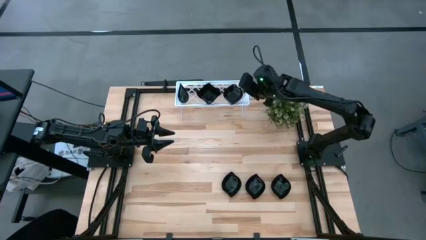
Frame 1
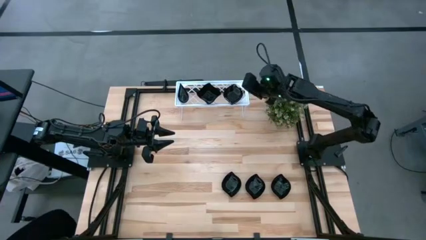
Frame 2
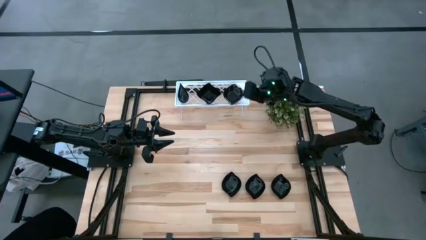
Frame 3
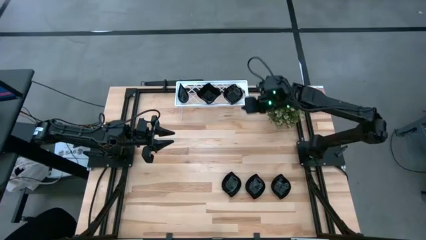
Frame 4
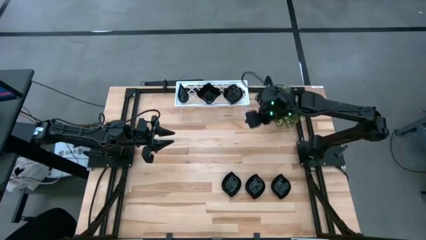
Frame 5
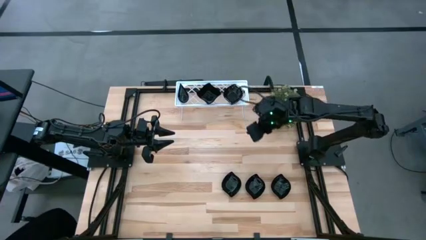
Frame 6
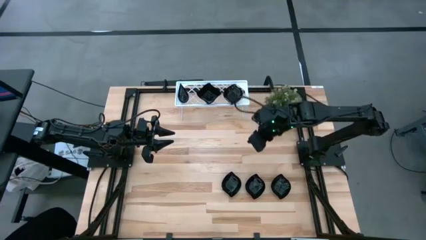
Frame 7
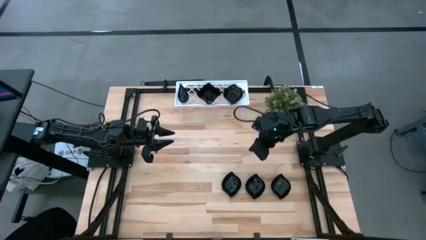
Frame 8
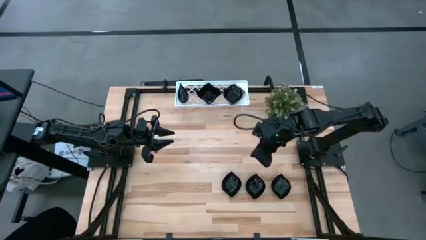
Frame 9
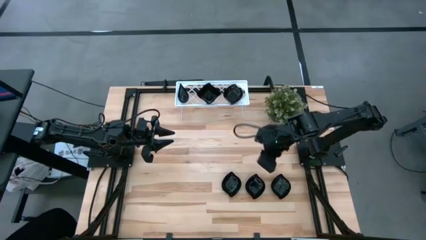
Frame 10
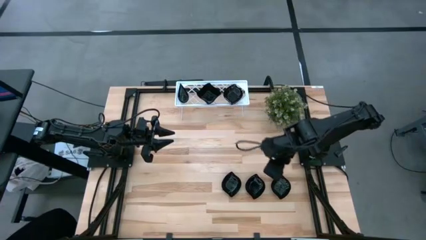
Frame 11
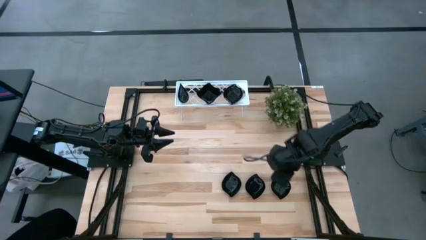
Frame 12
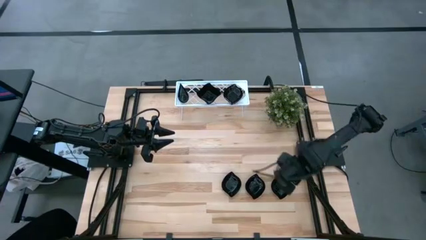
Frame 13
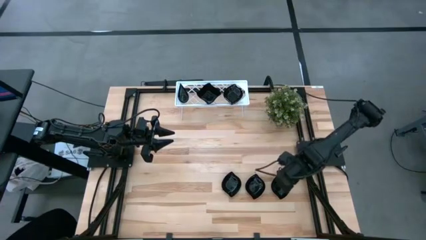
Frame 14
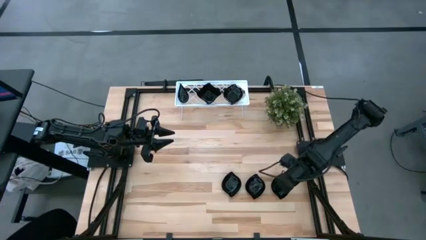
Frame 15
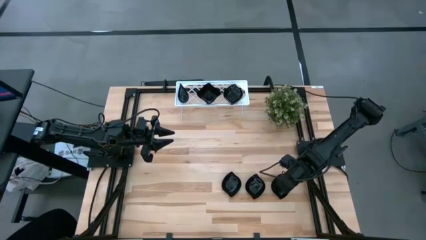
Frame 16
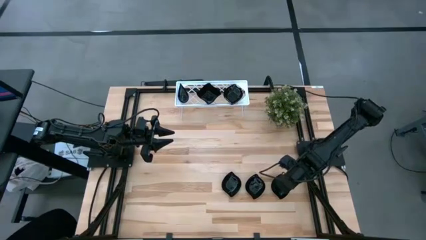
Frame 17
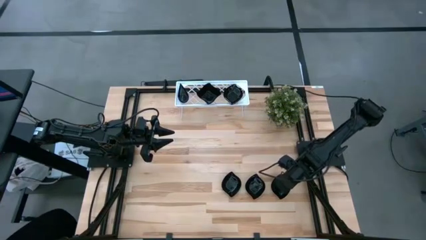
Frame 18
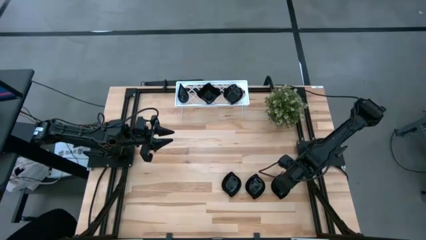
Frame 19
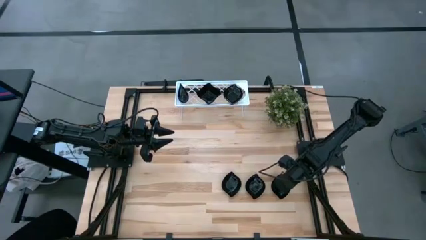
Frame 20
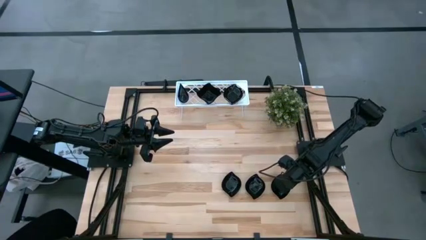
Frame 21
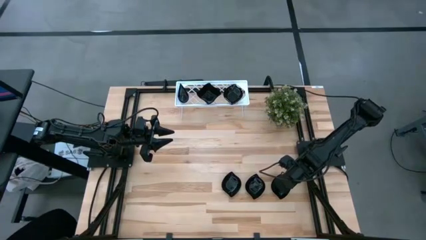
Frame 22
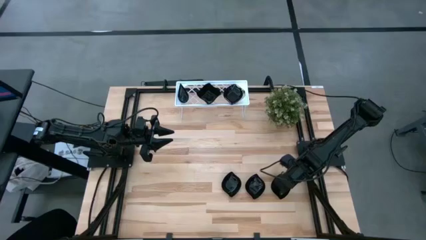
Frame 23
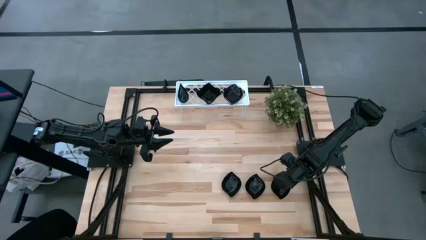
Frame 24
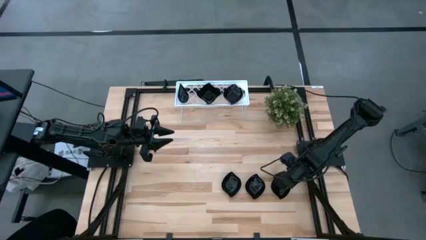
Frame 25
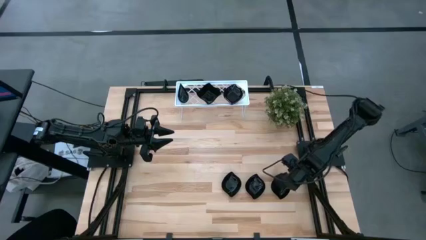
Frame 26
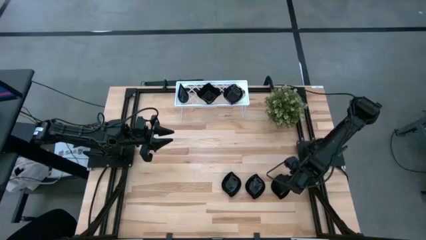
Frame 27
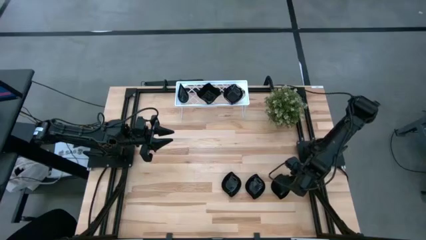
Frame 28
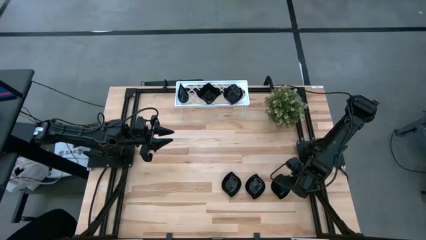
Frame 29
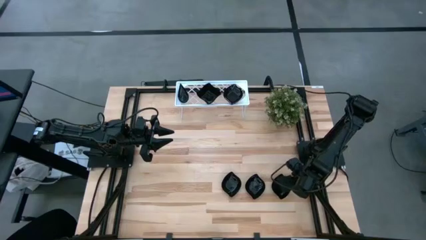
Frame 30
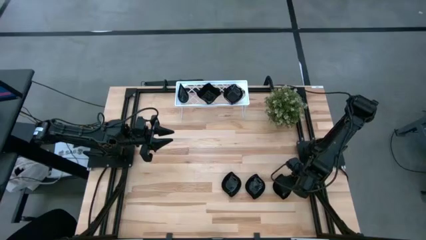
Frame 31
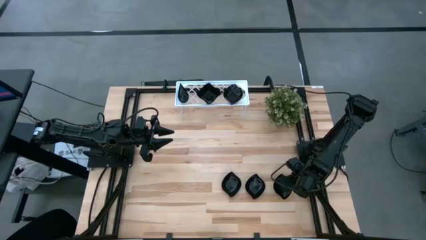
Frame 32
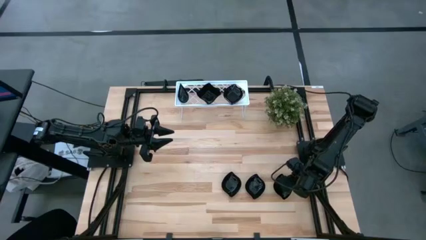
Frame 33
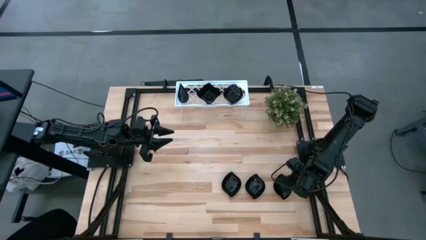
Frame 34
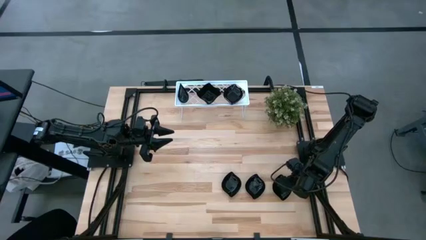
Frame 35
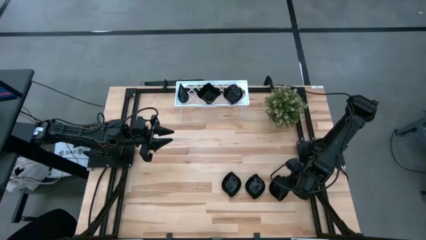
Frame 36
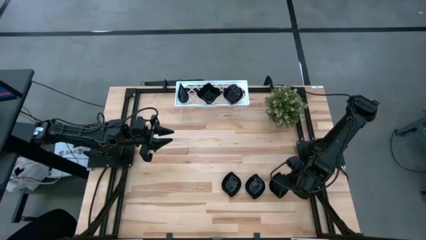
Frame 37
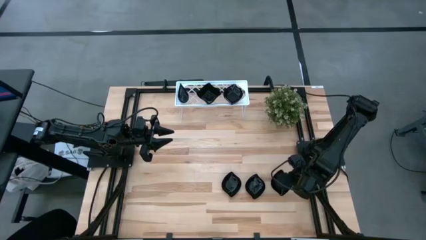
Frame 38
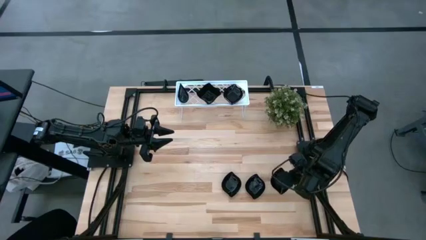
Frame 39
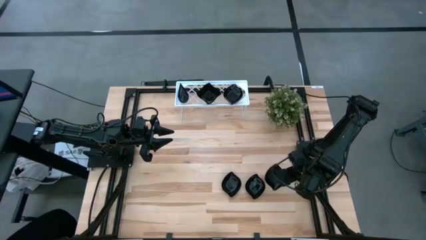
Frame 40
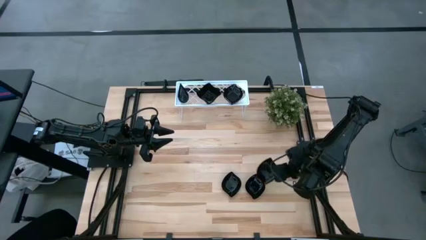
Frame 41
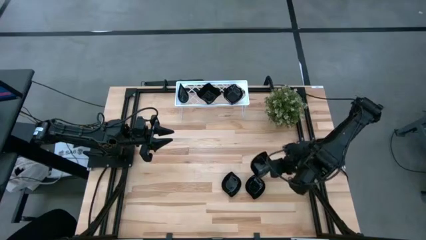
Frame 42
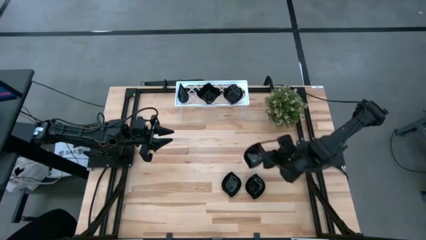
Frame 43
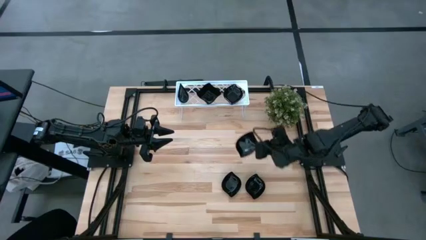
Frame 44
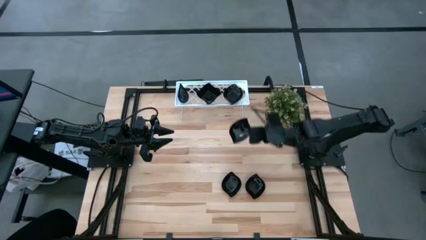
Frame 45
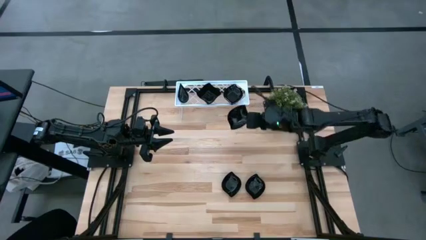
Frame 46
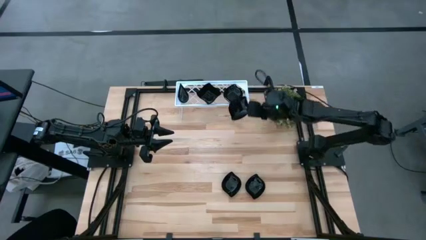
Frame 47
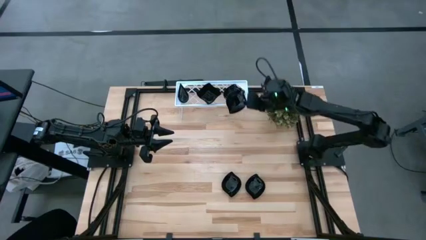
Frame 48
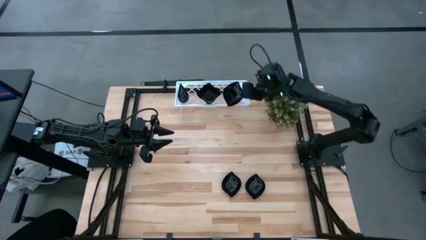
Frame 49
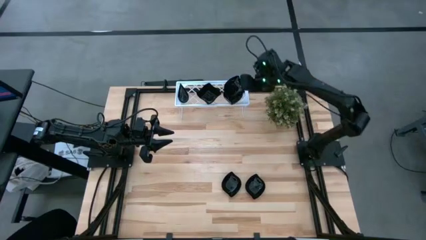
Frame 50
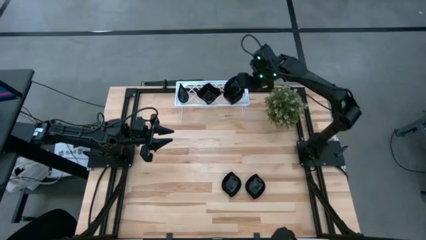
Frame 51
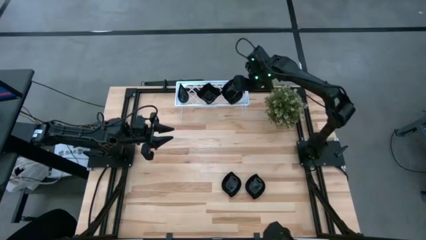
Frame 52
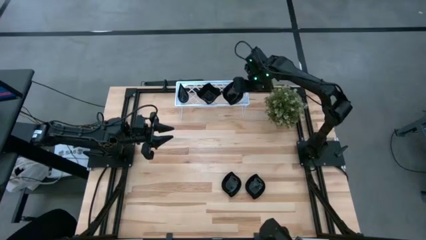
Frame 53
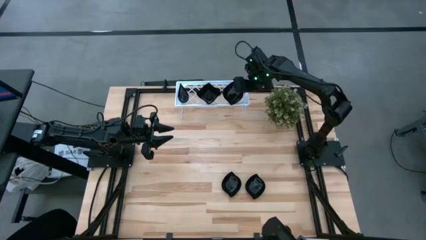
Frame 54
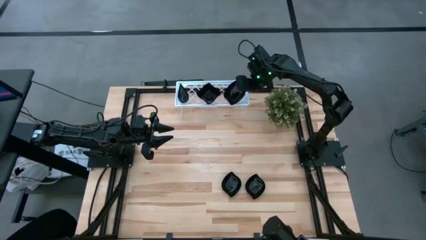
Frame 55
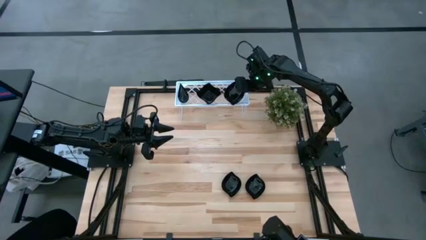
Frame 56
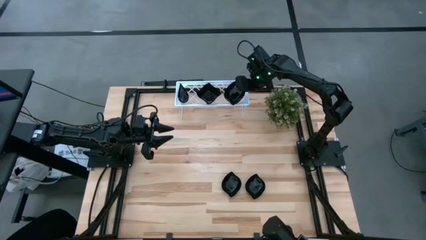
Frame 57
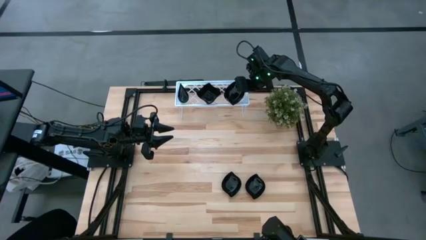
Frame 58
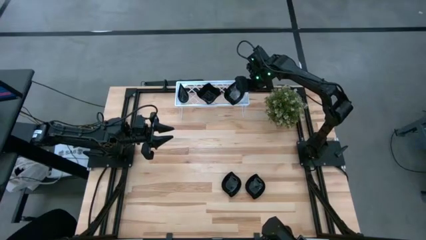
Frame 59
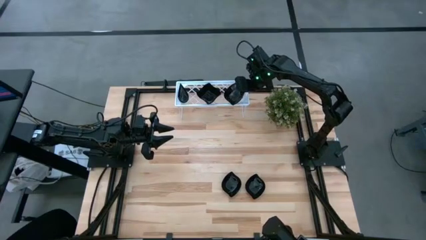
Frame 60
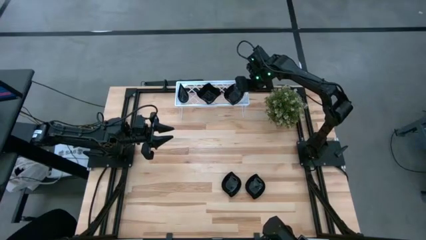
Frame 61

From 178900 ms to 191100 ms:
Task: Pick & Place Mini shaped plates
Stack the leaf-shaped plate on top of the leaf-shaped plate on the shelf

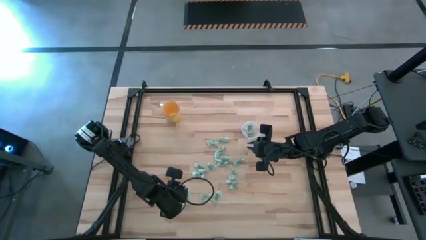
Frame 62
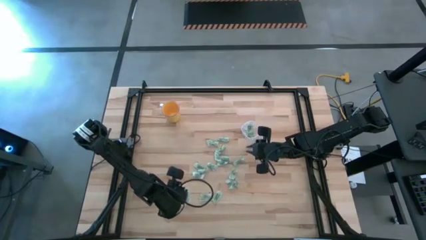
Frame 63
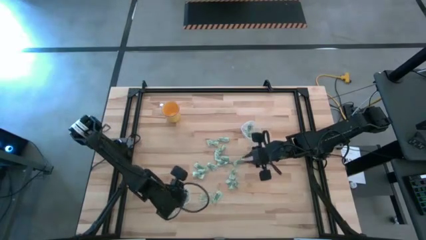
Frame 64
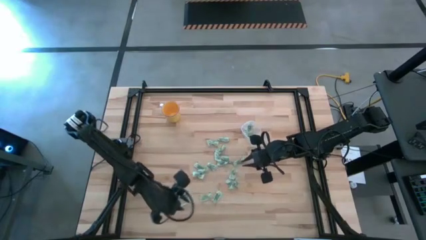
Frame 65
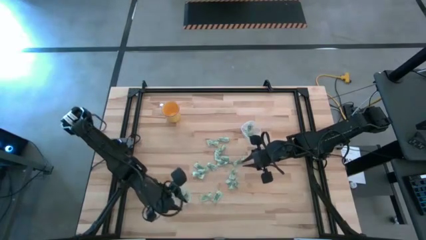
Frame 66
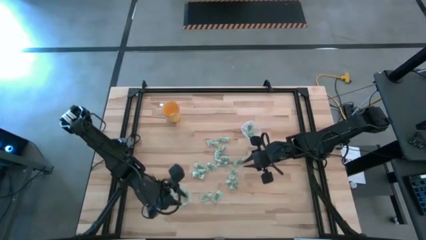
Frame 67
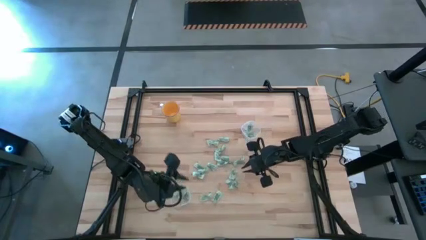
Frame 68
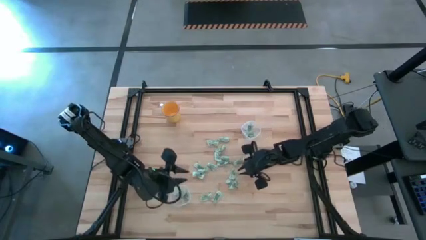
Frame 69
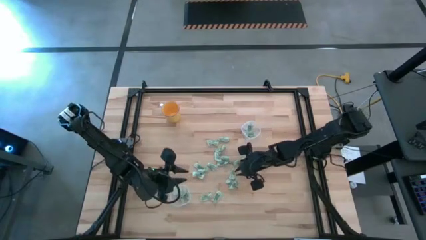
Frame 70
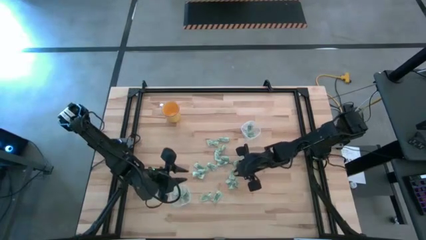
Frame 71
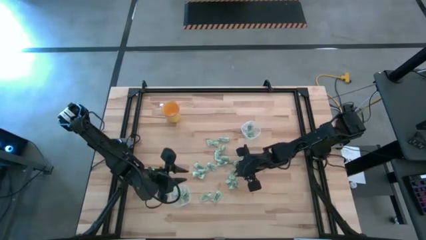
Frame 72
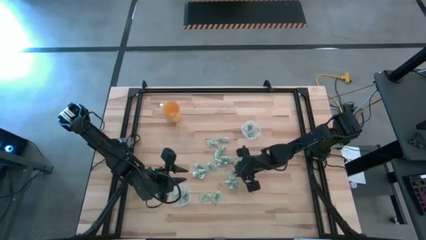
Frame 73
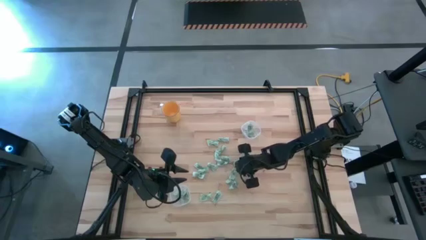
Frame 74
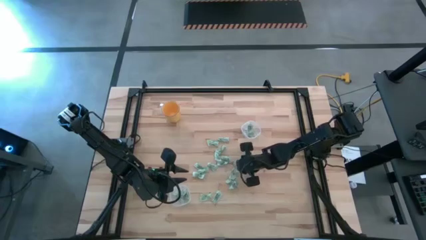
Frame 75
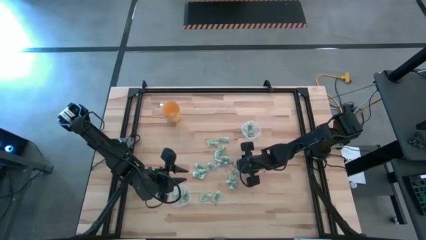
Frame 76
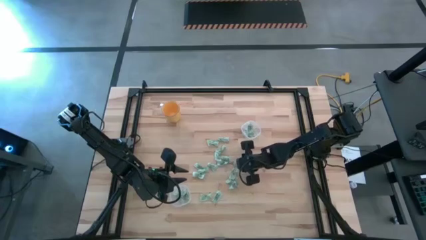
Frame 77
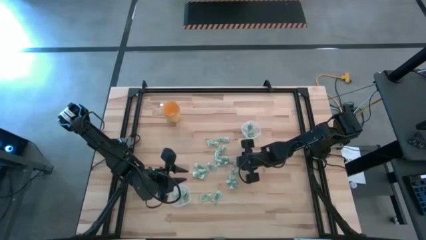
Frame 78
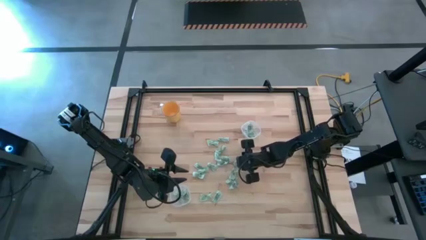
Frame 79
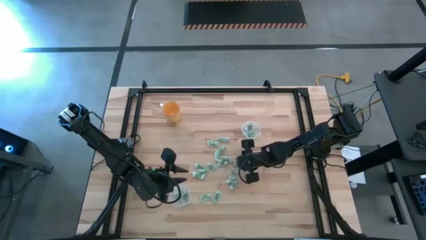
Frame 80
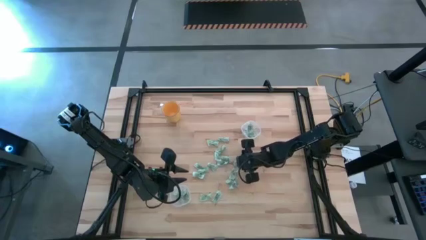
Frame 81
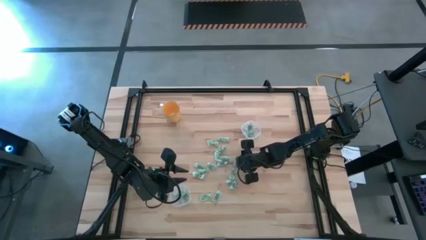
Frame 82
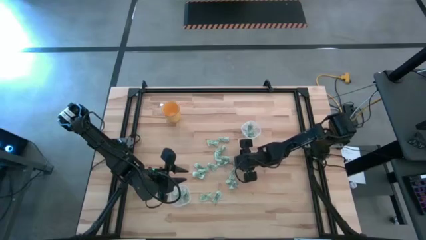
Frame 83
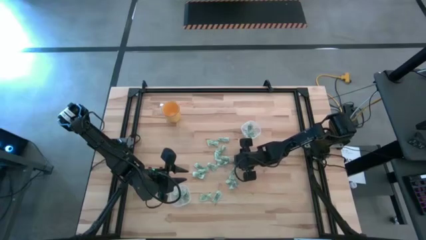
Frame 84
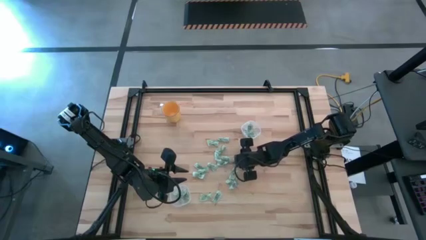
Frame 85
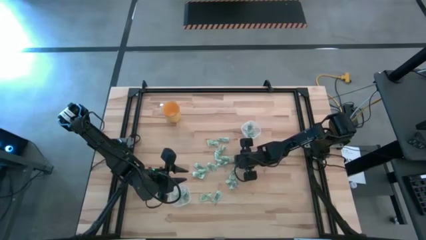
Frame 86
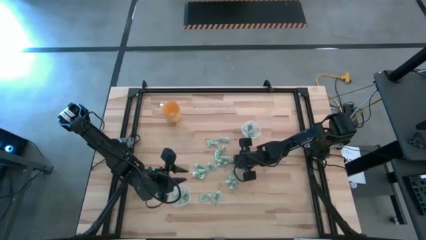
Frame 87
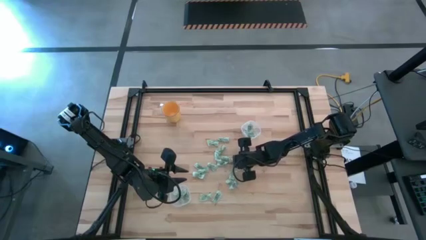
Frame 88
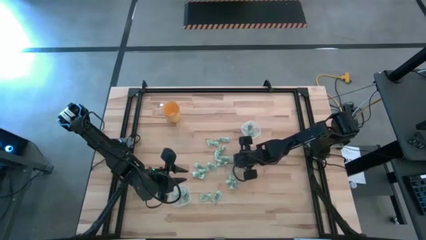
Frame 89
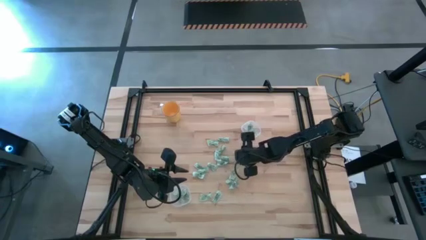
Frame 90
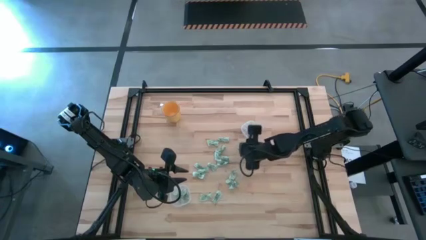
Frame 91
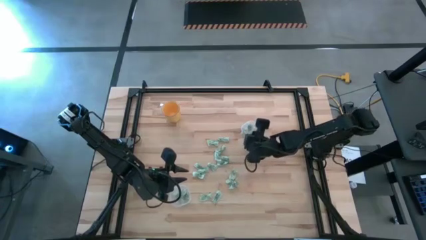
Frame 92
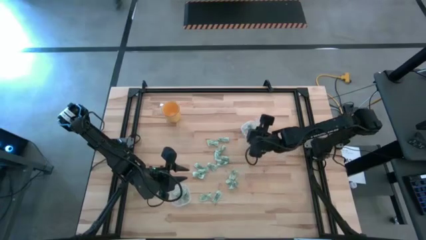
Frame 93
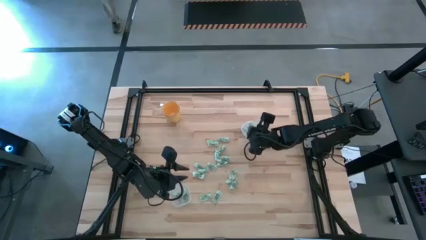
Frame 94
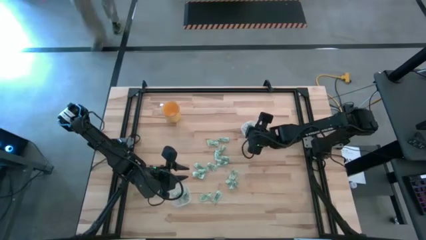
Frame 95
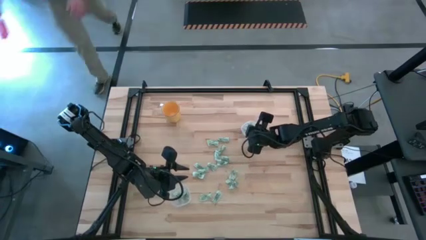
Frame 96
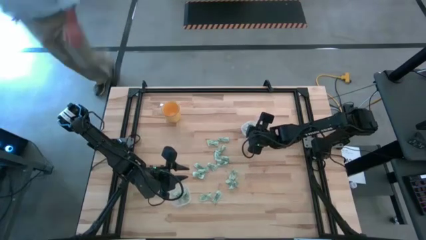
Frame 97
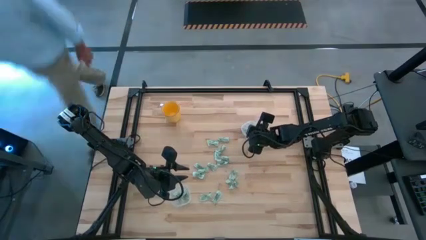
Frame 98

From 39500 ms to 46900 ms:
Task: Pick and place Stevia / Truvia into bins
Put the green stevia packet into the top transparent container
